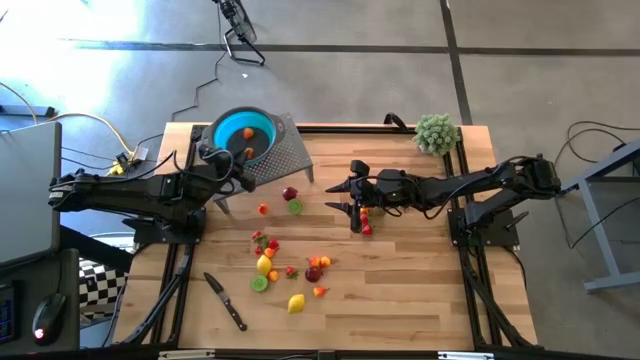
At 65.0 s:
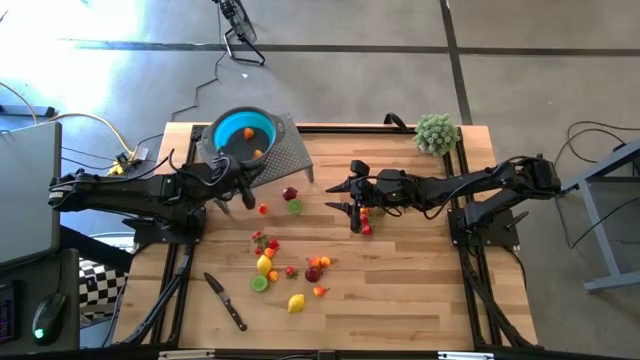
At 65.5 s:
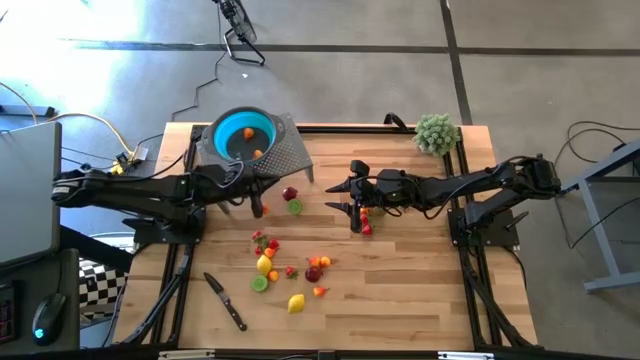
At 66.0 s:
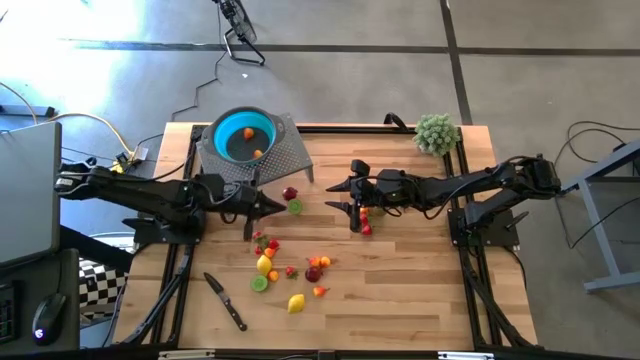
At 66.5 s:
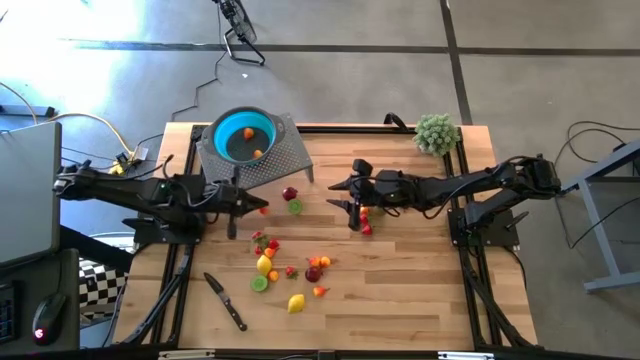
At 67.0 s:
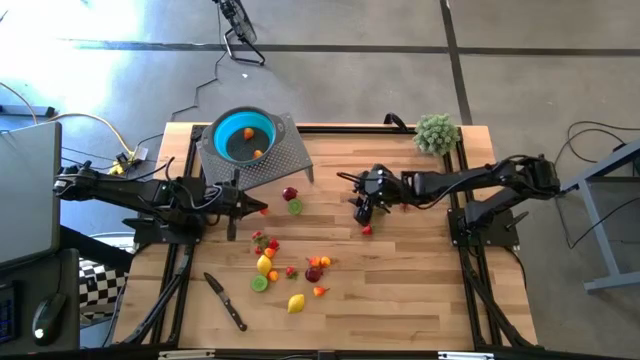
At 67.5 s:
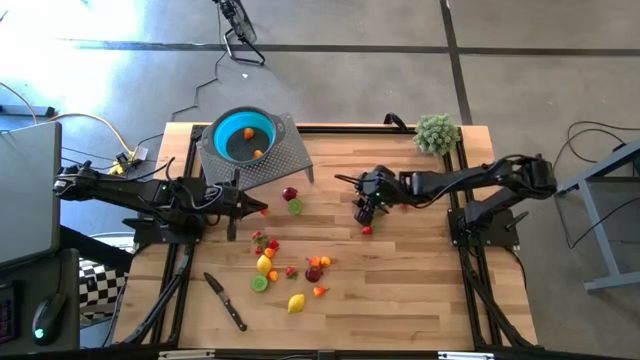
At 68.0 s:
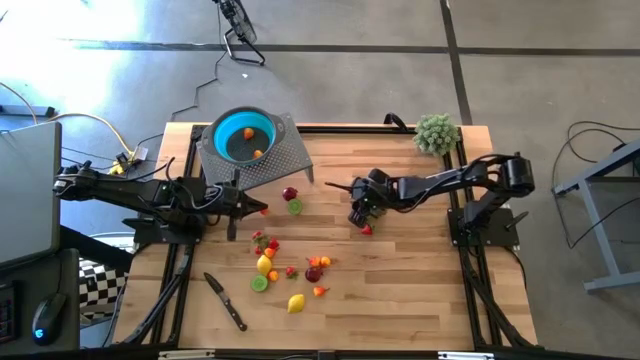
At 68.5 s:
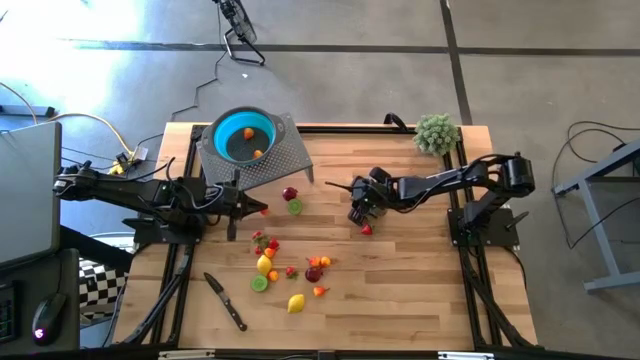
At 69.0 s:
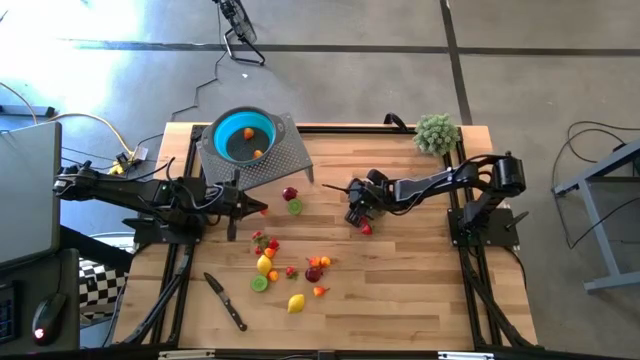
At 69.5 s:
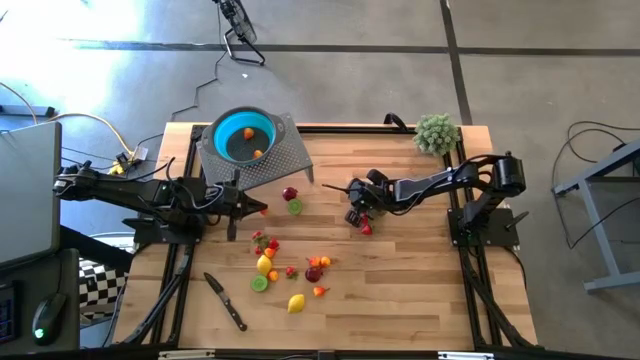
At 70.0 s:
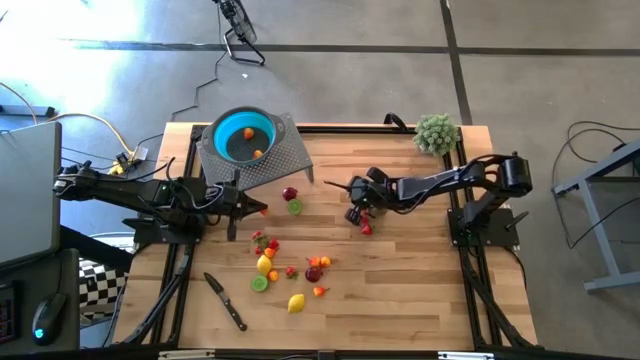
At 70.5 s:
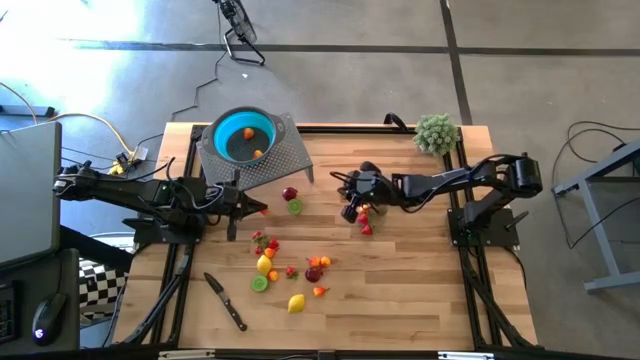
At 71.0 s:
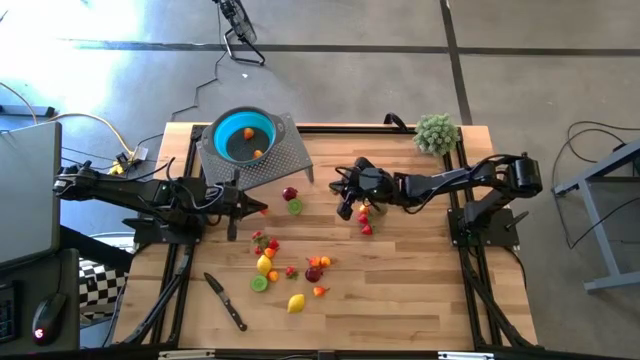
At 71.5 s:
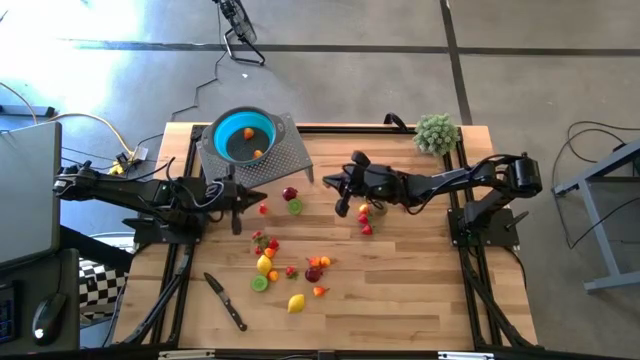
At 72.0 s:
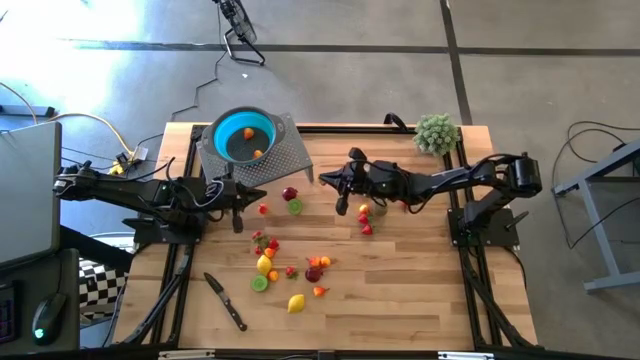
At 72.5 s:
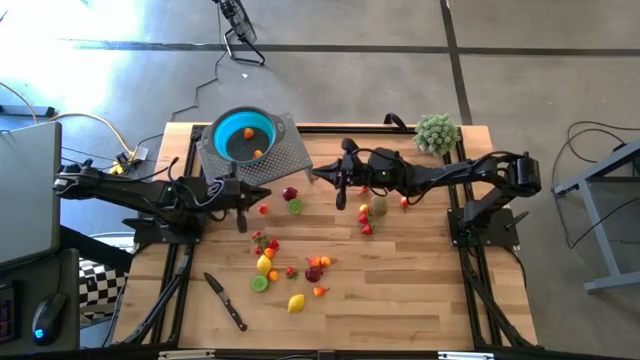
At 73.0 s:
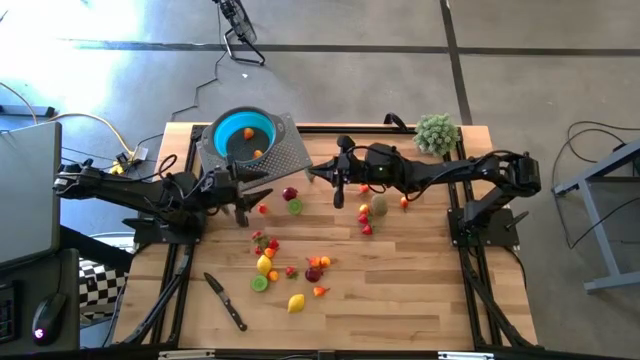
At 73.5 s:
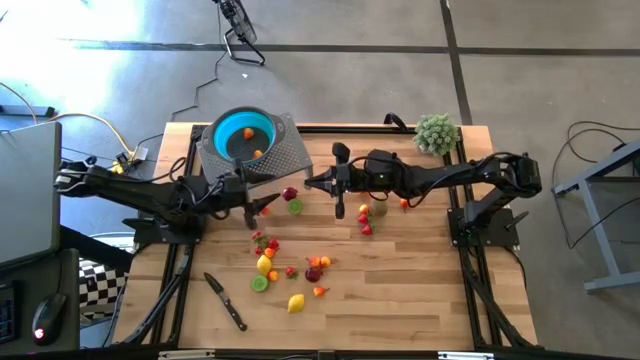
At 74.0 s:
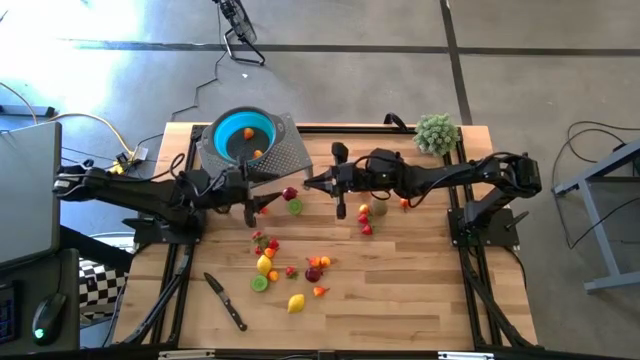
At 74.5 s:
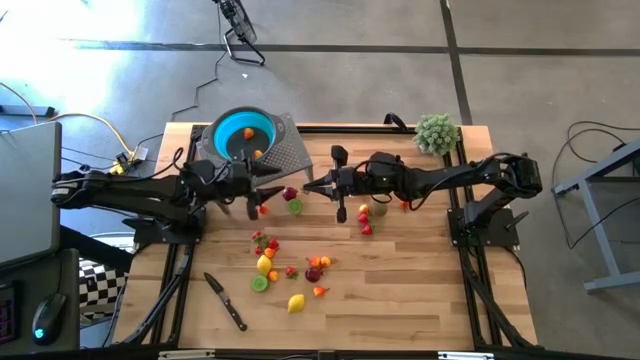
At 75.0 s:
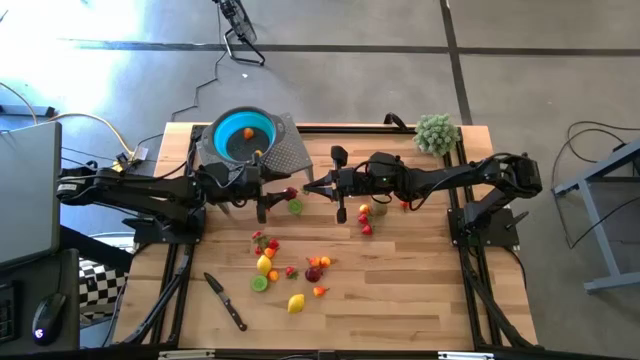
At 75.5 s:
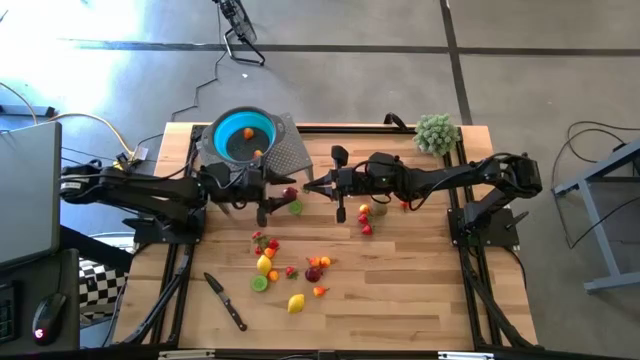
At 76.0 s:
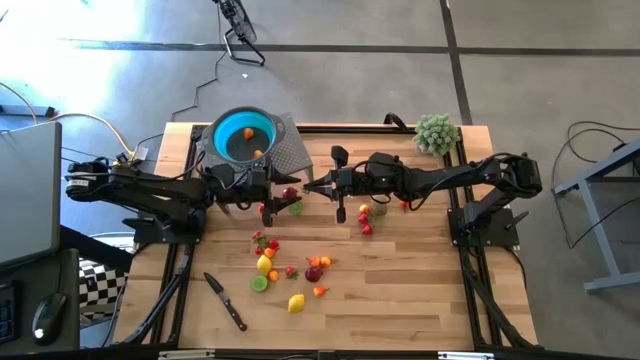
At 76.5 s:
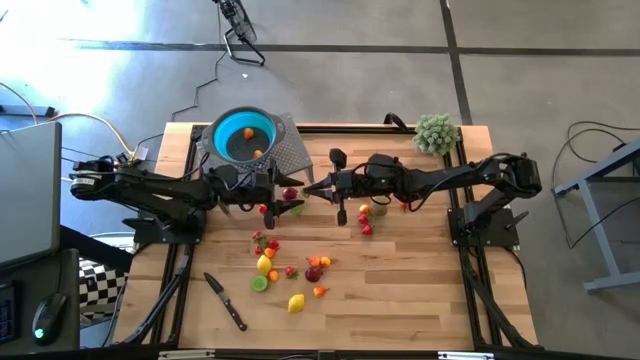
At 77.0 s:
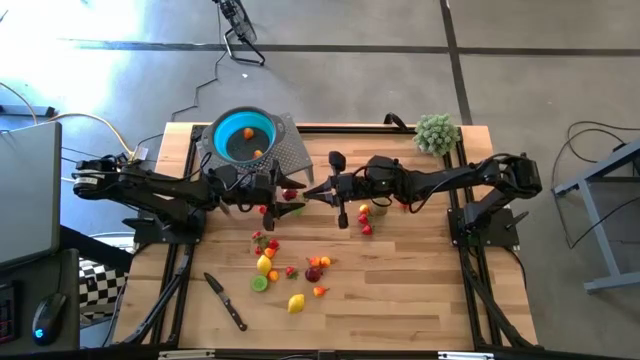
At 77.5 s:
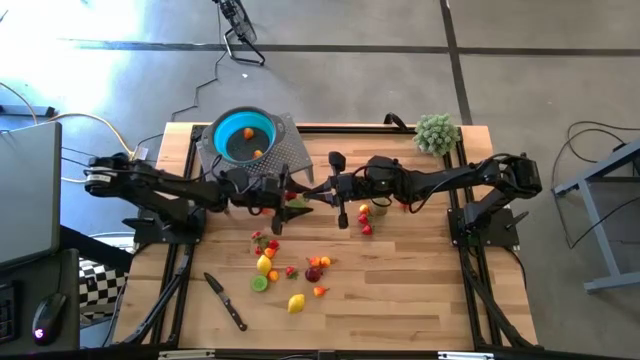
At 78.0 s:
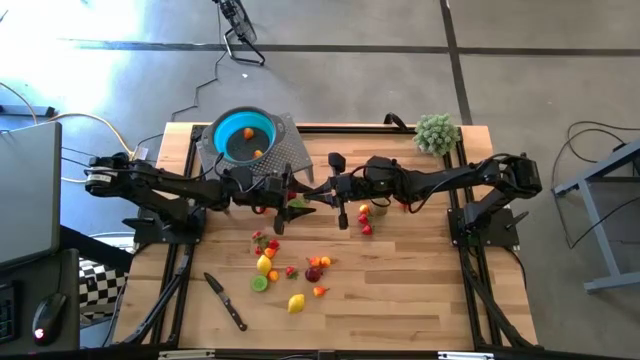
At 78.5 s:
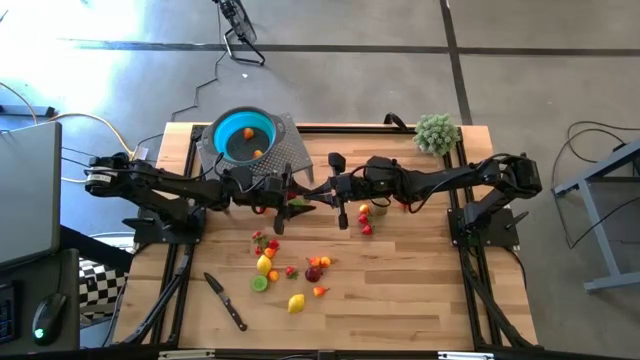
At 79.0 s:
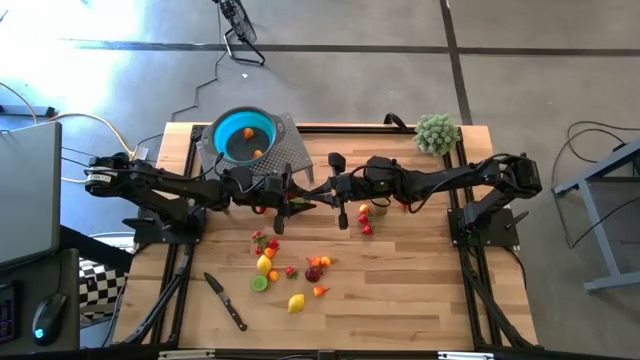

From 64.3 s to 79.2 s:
Task: Pick & Place Fruit
Put the red strawberry into the blue strainer bowl on the shelf

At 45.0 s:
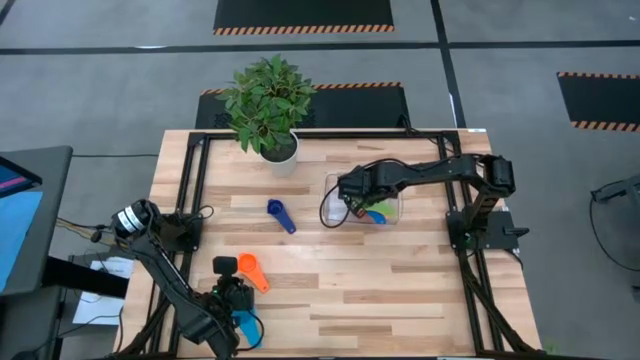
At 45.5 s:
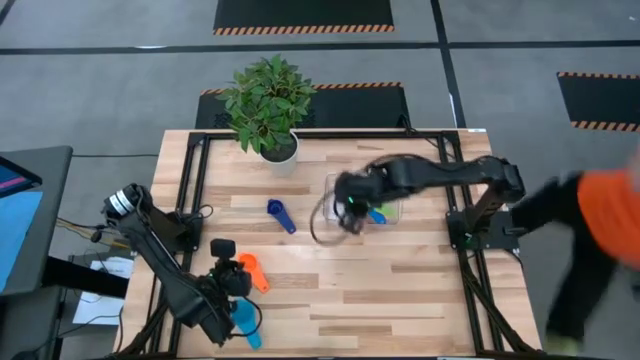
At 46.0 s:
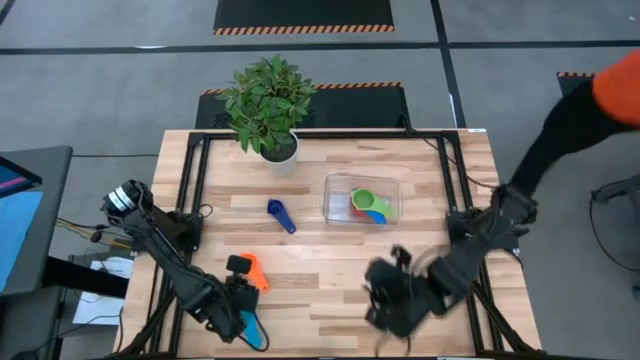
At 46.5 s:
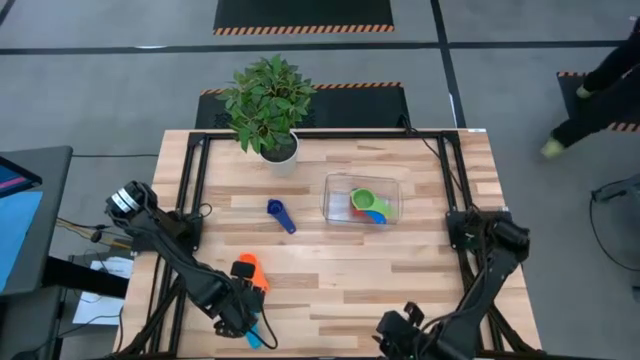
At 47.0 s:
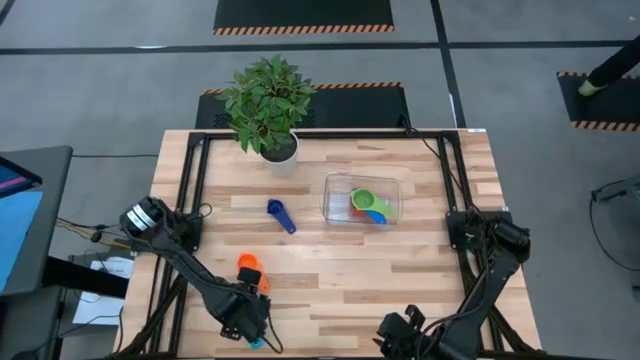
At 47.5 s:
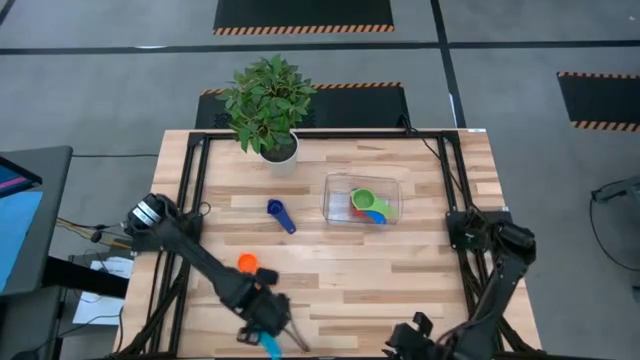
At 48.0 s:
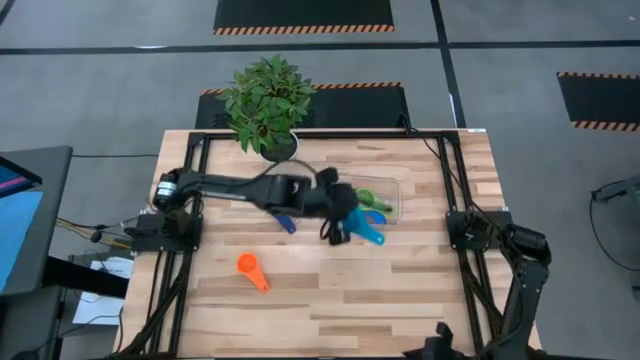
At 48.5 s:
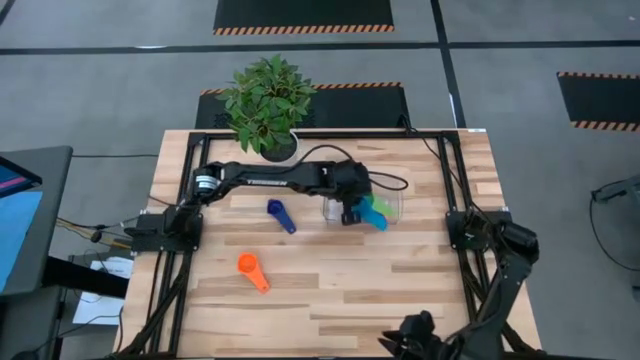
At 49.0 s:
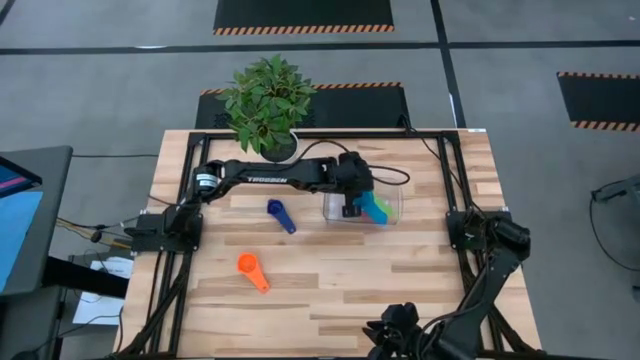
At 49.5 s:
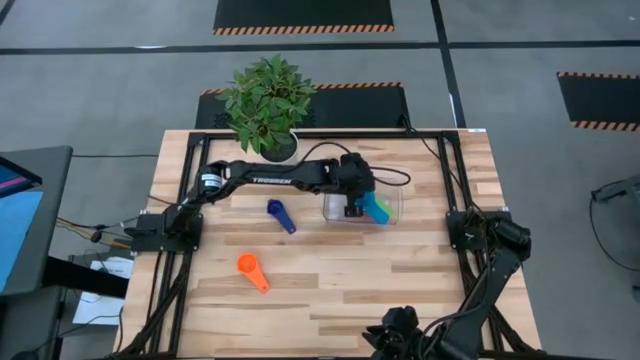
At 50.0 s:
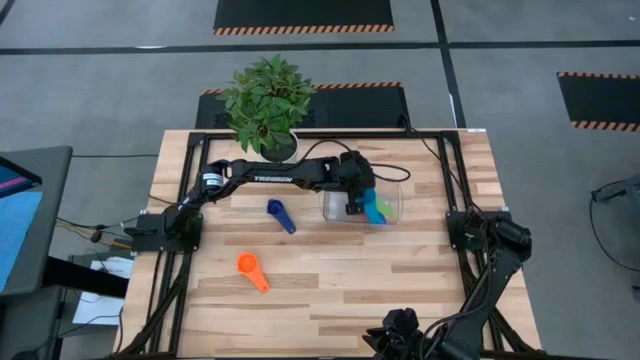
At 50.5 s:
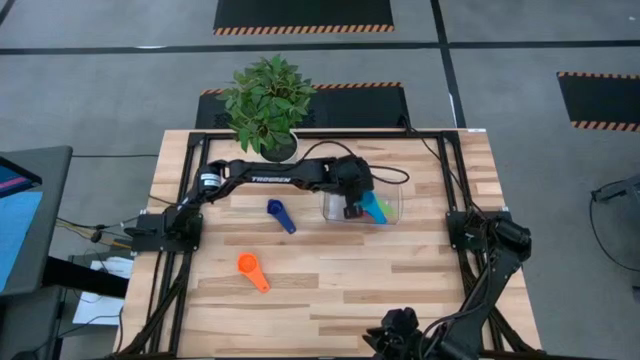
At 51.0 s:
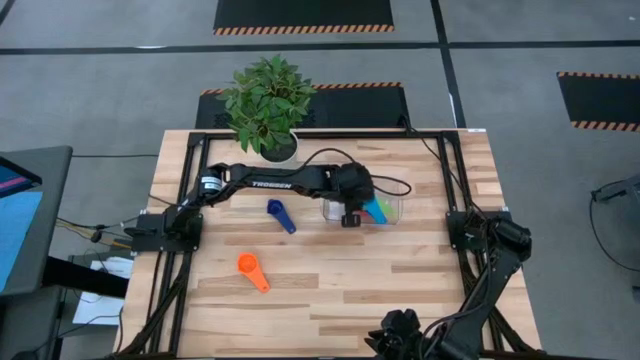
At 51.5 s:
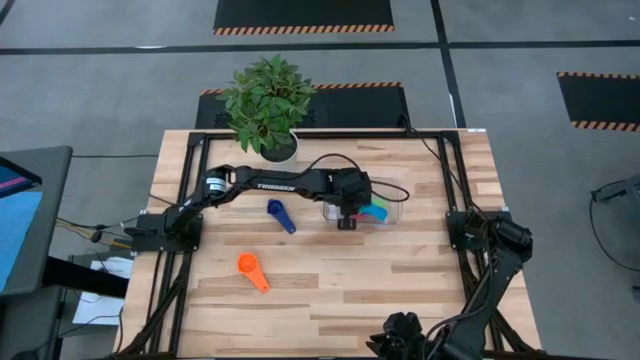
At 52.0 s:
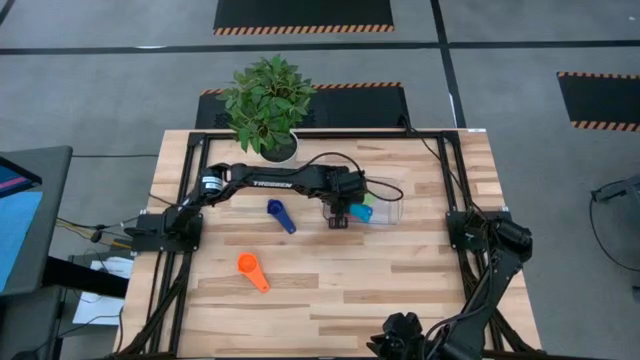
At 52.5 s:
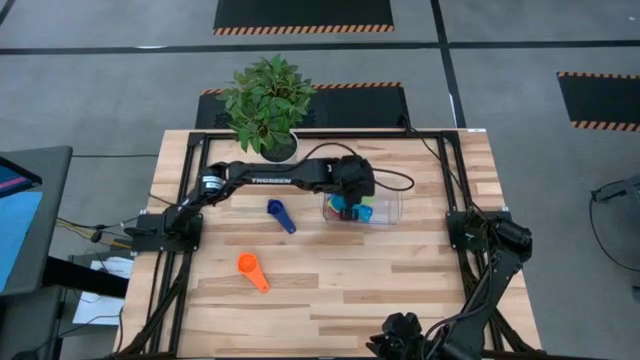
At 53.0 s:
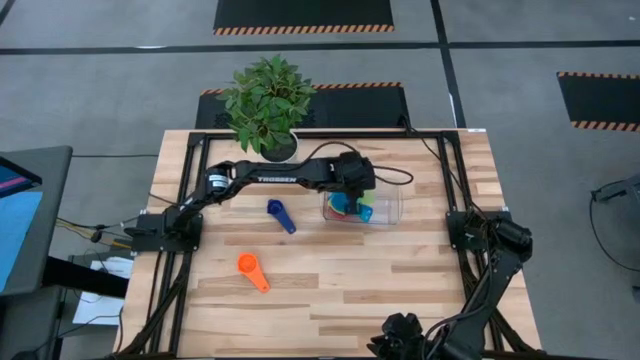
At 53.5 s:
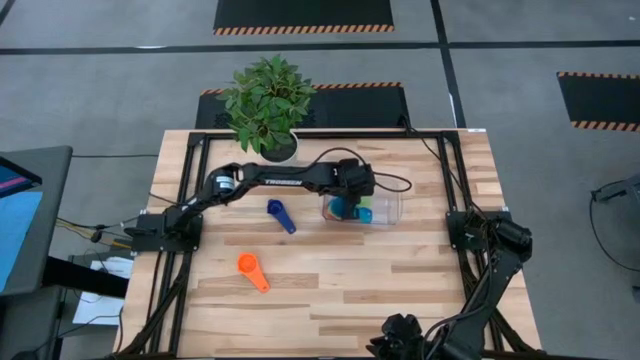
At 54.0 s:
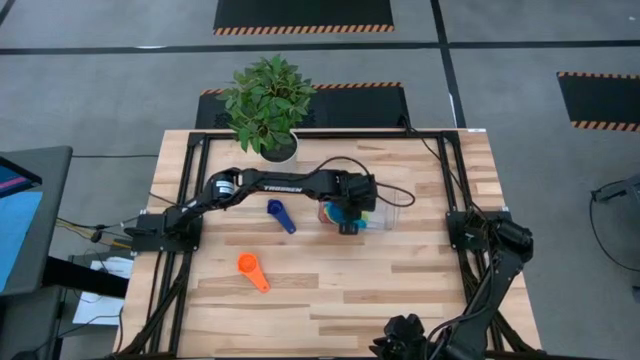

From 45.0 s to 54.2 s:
Task: Nest measuring cups in basket
Stack the light blue measuring cup on top of the green measuring cup in the transparent bin
